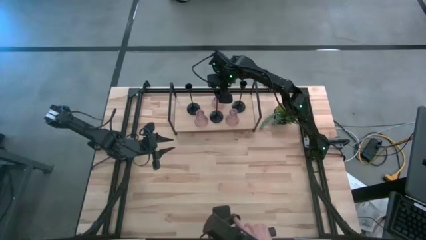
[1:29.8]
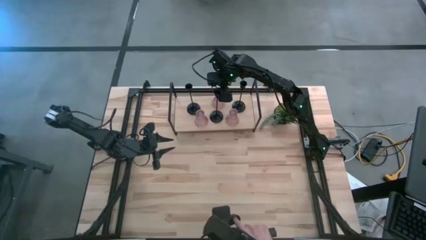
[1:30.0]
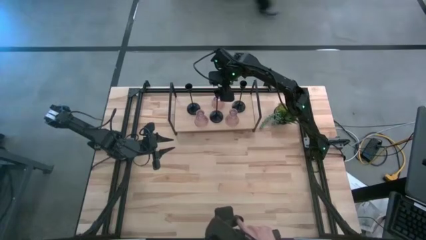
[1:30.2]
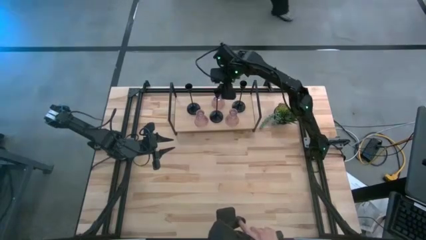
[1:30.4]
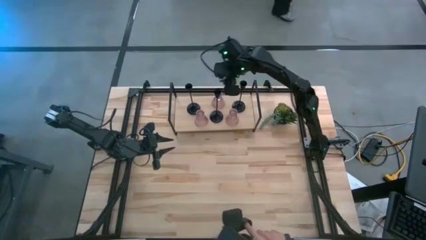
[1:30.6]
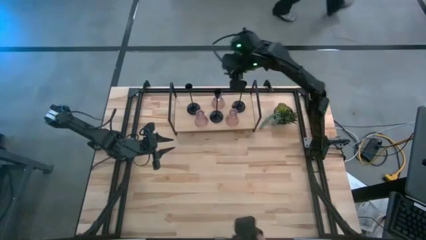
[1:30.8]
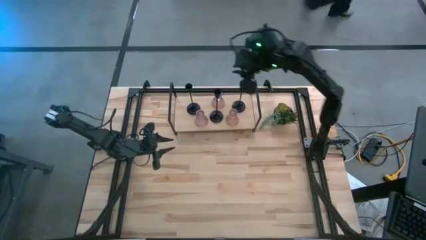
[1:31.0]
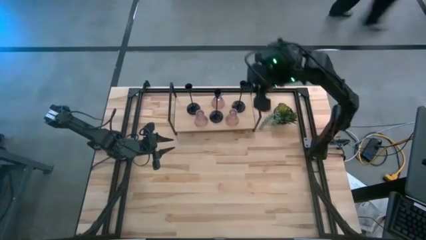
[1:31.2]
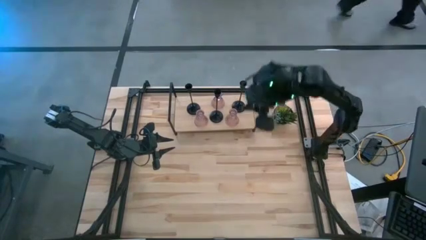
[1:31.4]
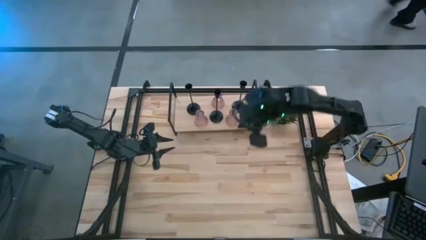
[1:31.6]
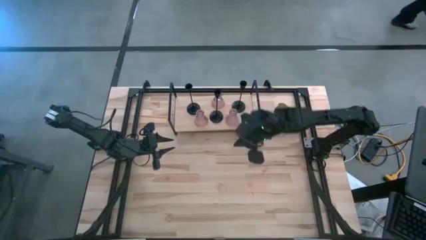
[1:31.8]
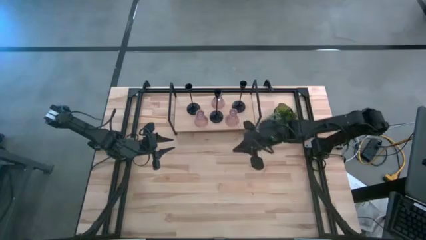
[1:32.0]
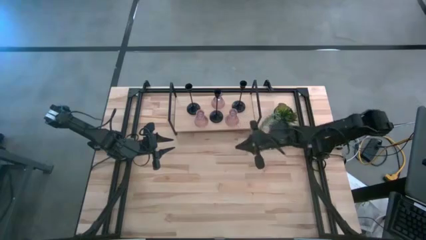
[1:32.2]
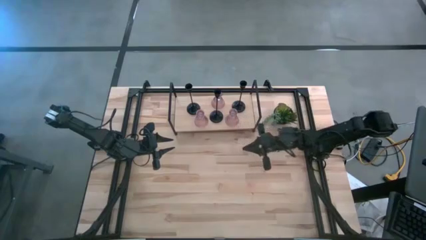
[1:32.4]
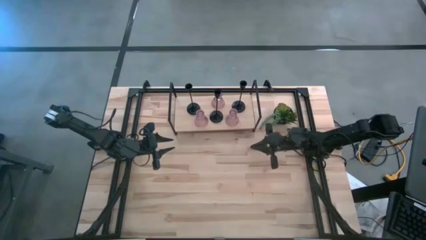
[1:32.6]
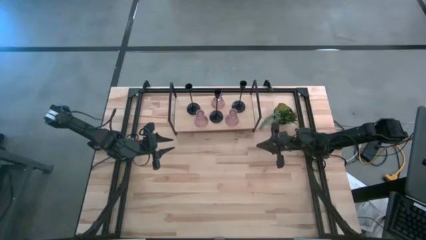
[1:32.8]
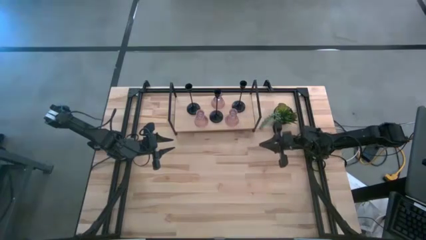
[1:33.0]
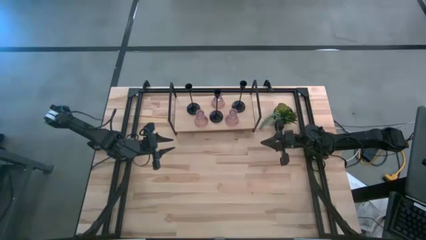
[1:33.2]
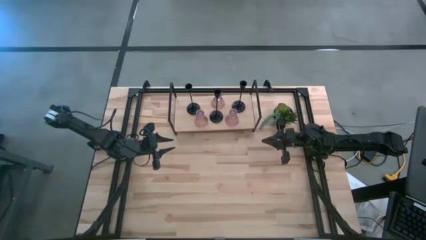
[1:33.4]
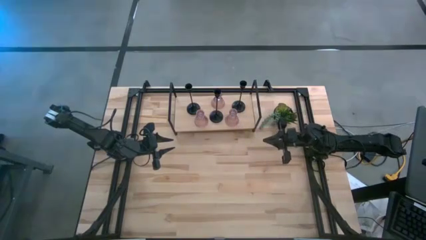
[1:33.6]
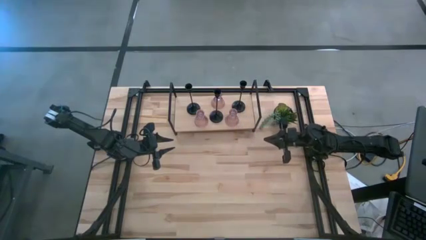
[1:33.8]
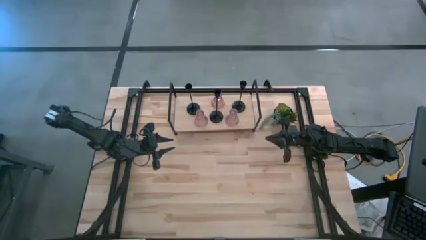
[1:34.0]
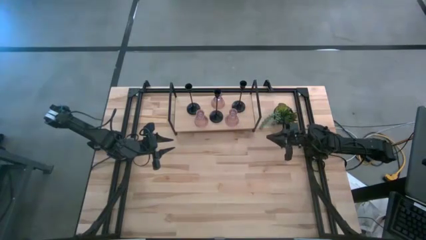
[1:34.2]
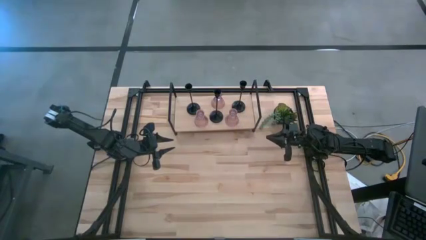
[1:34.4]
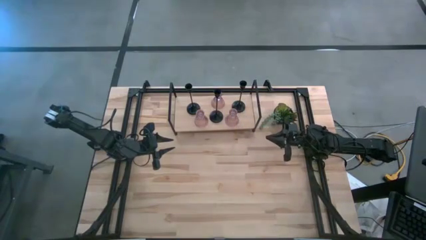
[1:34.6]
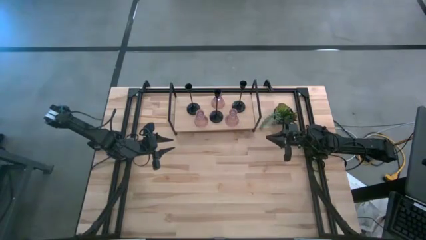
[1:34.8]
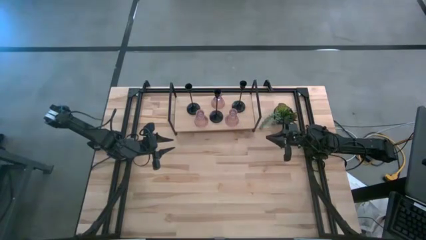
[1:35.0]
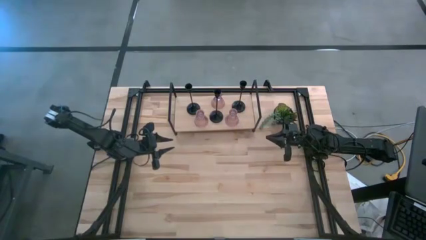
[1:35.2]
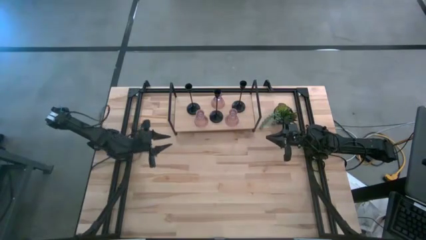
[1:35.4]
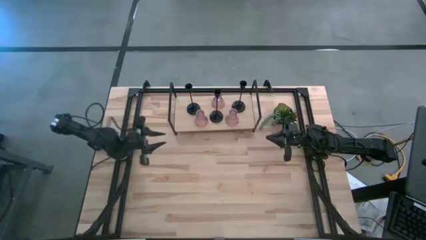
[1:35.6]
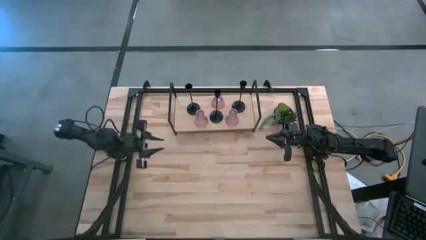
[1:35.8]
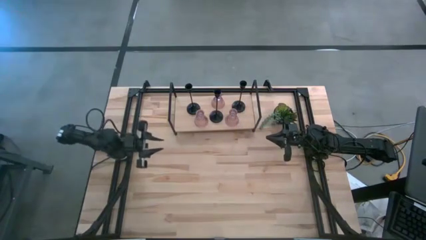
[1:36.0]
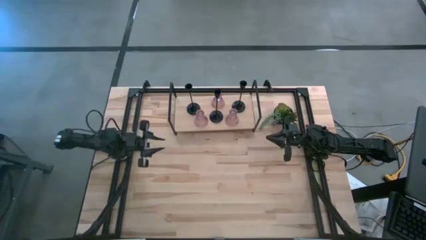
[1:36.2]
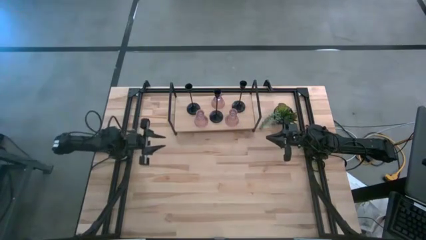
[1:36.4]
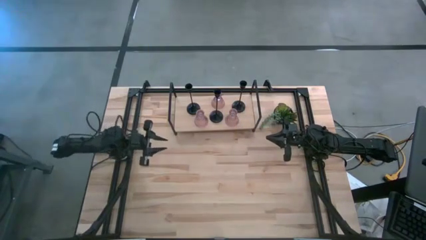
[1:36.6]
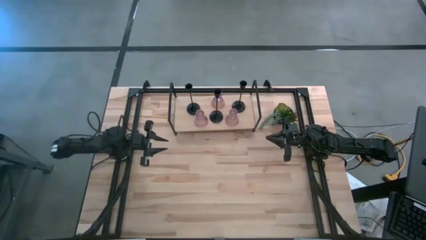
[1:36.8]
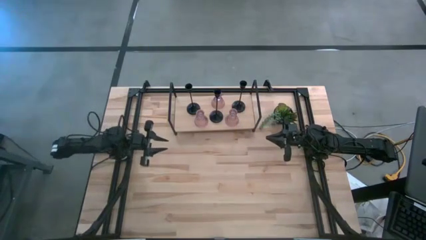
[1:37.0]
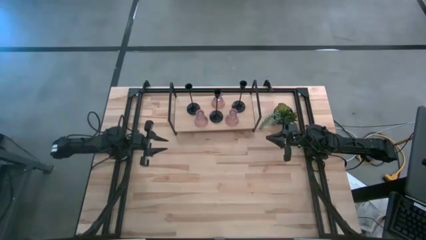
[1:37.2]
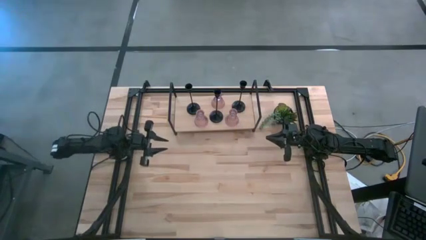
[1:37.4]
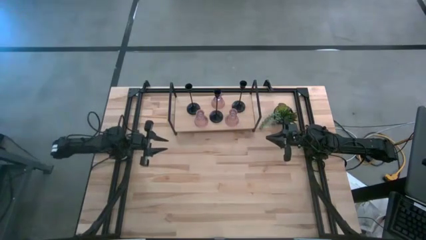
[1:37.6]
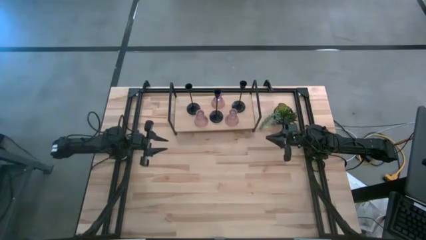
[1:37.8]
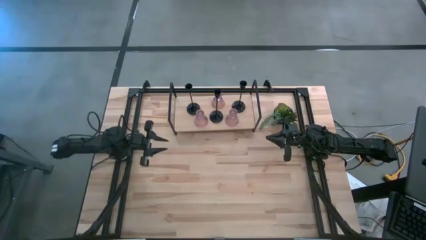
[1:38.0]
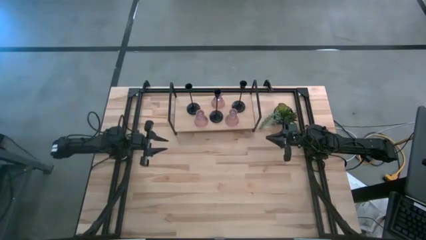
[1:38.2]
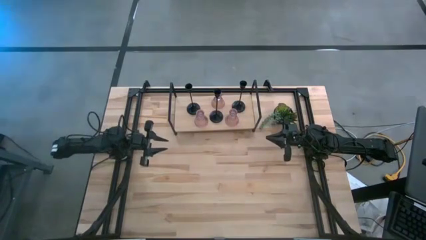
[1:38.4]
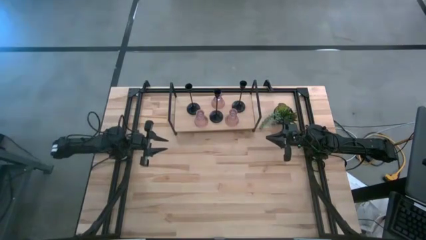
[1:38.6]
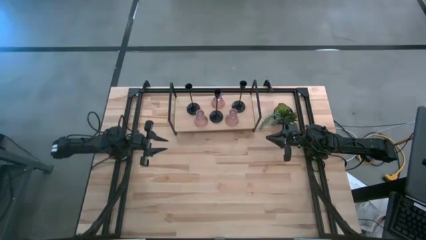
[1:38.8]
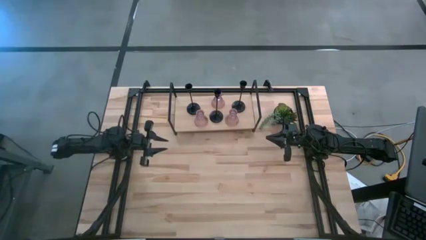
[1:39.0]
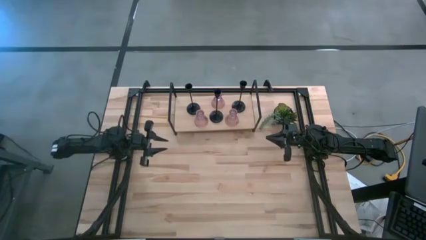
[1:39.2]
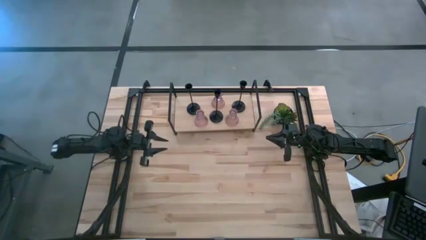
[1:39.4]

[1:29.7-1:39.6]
Task: Pick & Place candle stick holders
Return to Home Position

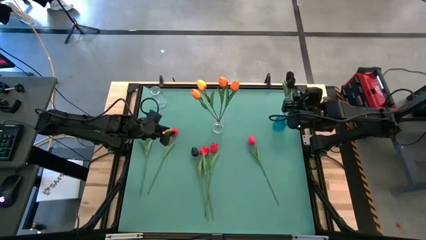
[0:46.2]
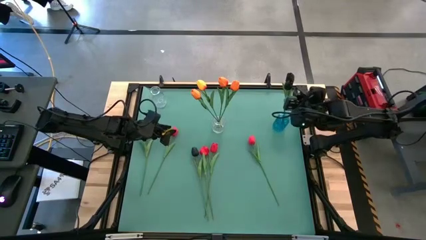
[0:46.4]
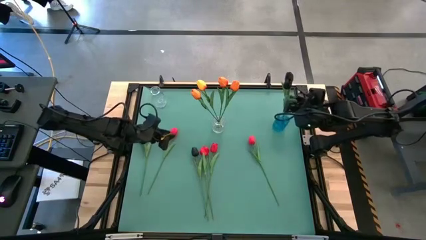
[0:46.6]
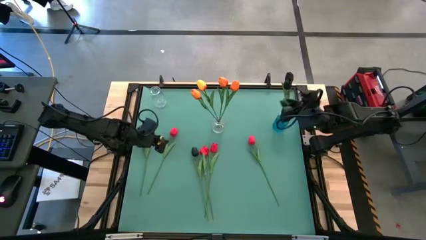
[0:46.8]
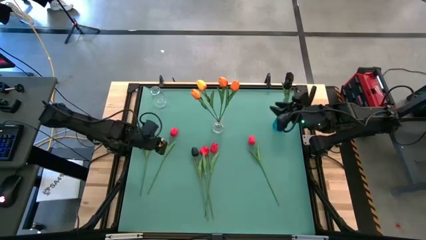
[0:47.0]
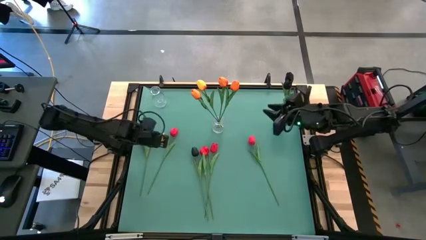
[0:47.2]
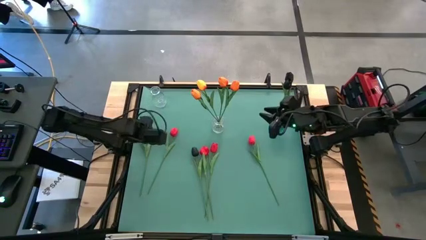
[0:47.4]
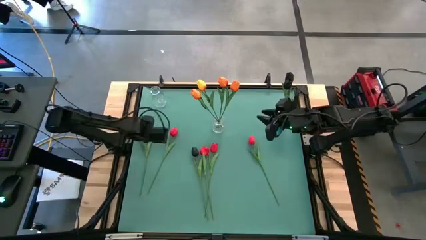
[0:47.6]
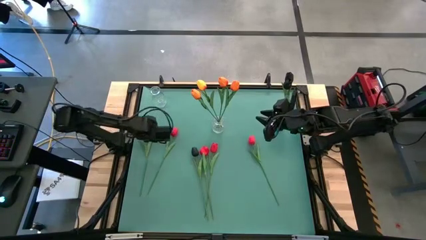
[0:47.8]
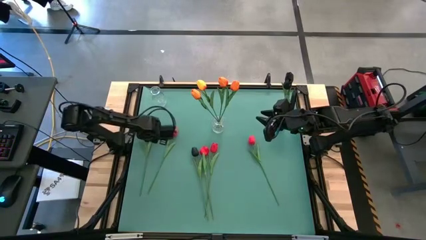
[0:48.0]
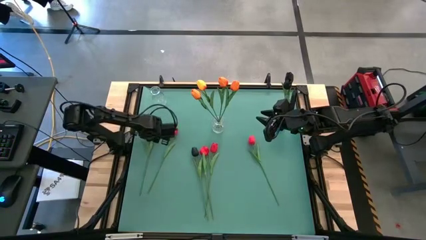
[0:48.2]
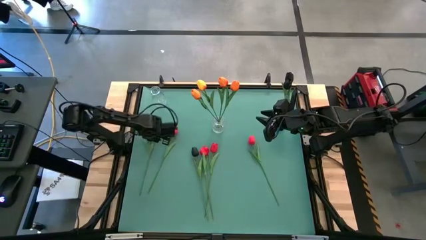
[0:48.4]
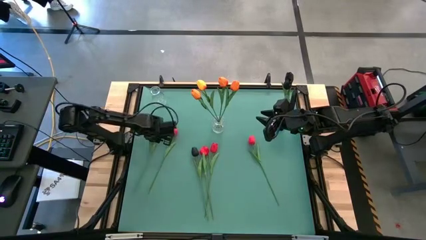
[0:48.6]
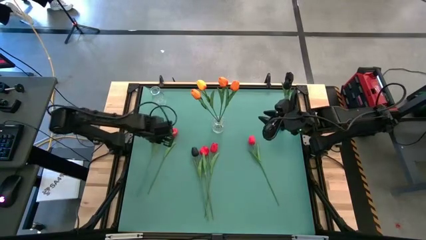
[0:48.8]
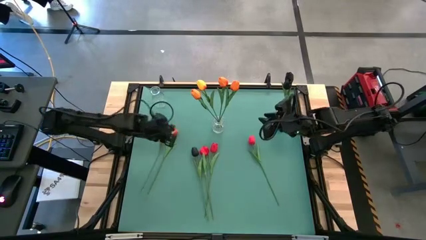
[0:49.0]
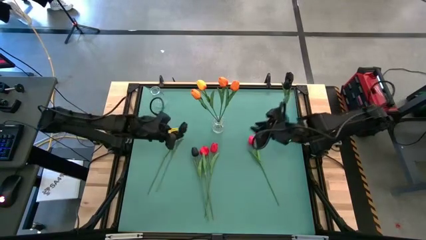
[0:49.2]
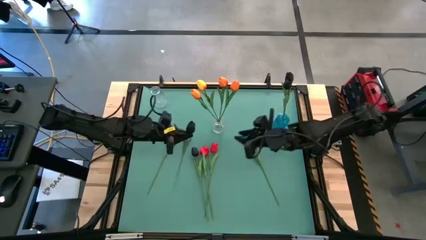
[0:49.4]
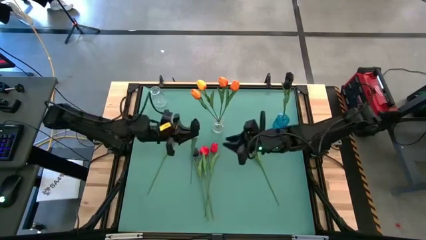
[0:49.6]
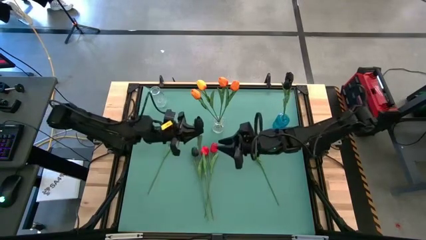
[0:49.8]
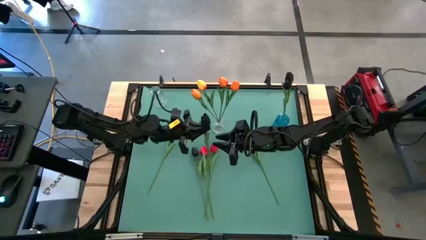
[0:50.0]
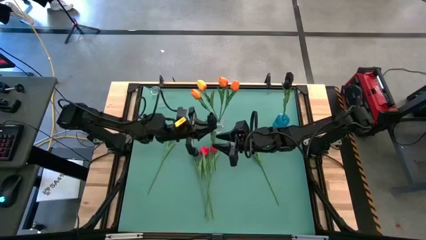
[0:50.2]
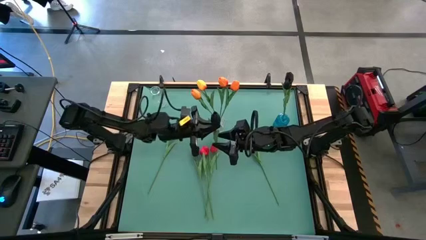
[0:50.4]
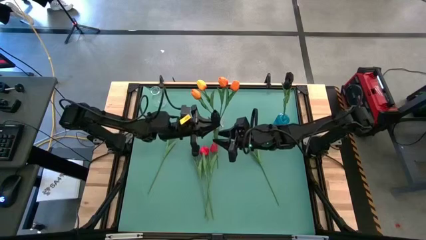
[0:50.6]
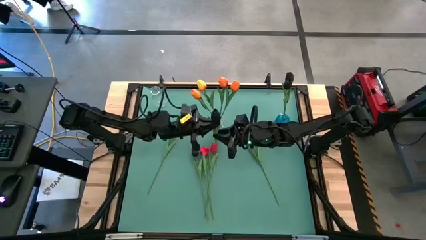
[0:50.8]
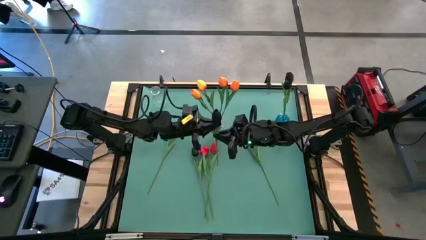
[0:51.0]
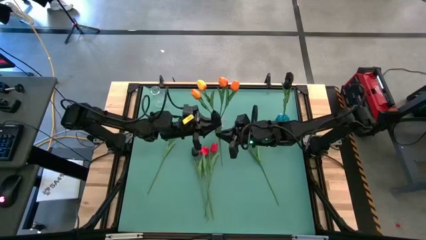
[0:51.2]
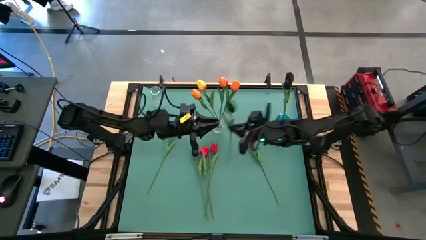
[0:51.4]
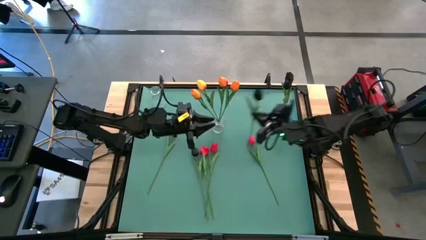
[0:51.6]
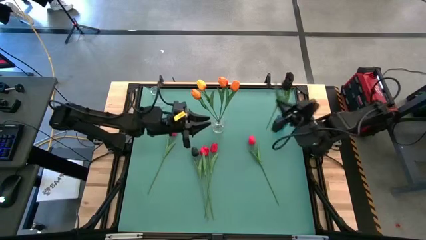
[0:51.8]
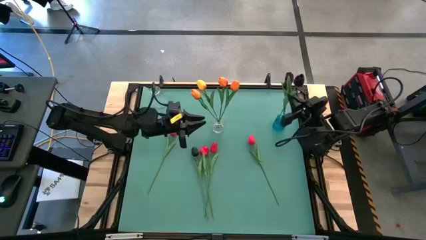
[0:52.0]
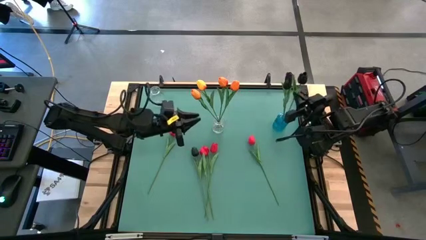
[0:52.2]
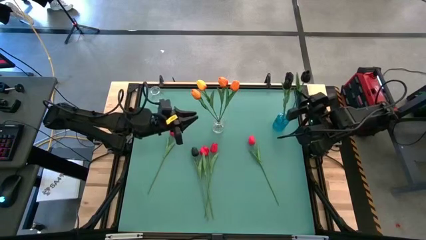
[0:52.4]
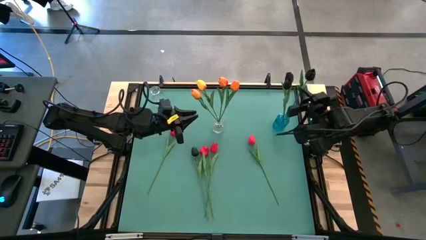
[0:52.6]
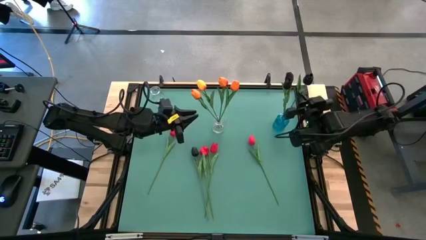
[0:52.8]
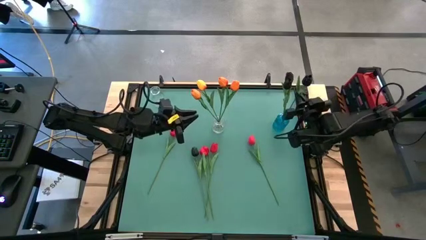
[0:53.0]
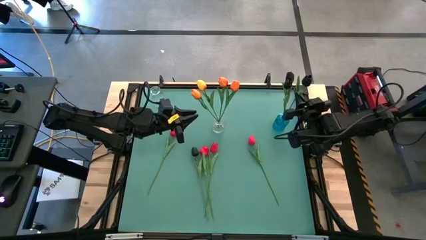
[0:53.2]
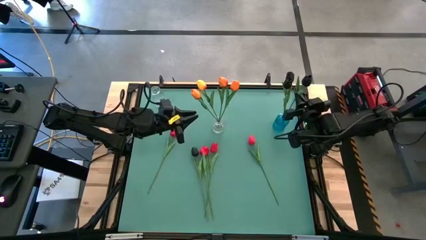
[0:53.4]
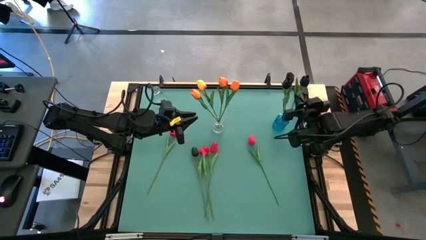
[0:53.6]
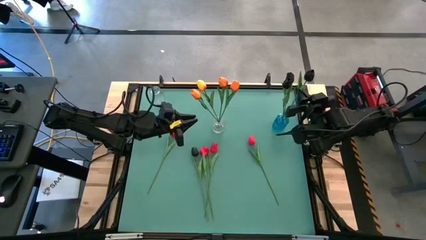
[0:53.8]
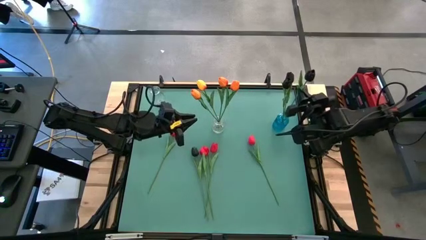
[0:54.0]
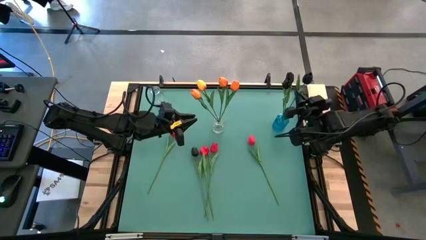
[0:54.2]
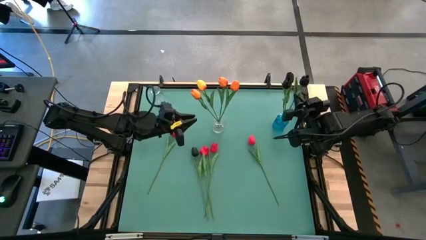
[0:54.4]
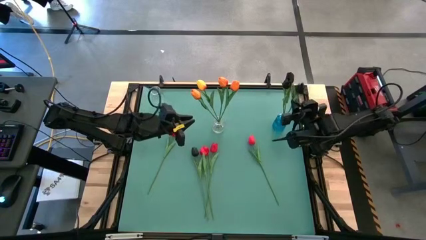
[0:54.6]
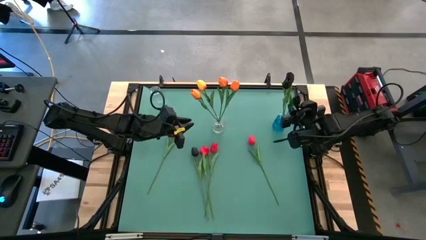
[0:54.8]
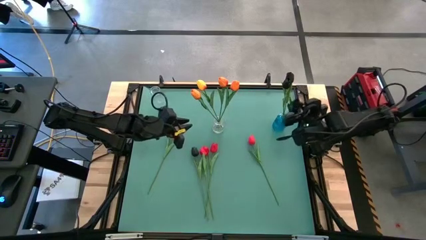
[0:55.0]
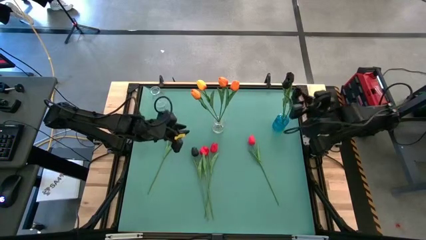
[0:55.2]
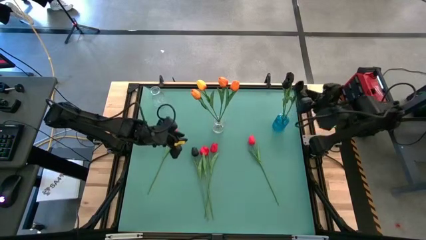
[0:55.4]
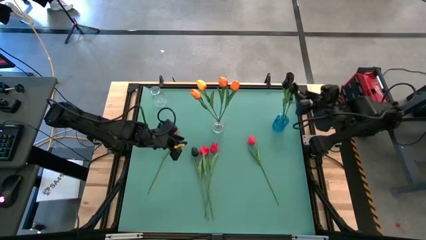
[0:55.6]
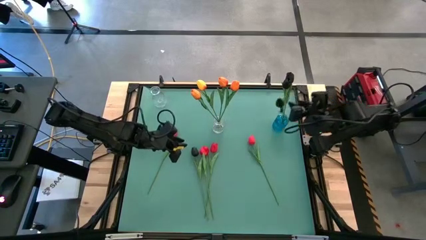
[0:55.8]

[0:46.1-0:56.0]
Task: Sort flowers into vase by color
Put the black tulip into the blue vase
